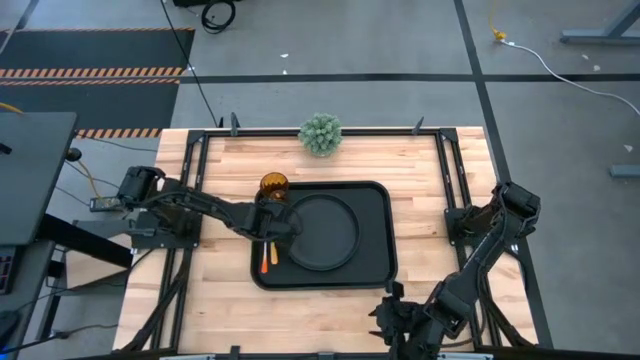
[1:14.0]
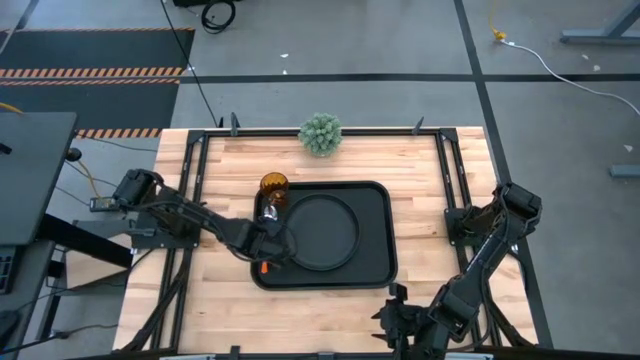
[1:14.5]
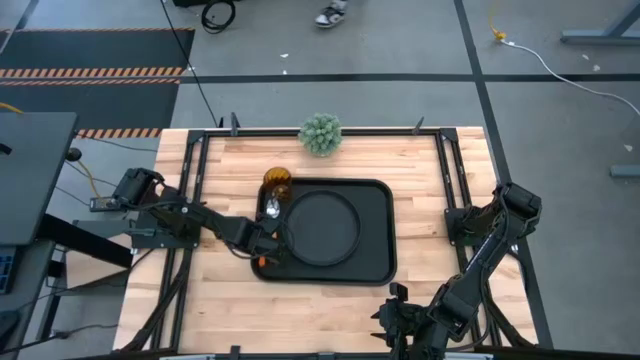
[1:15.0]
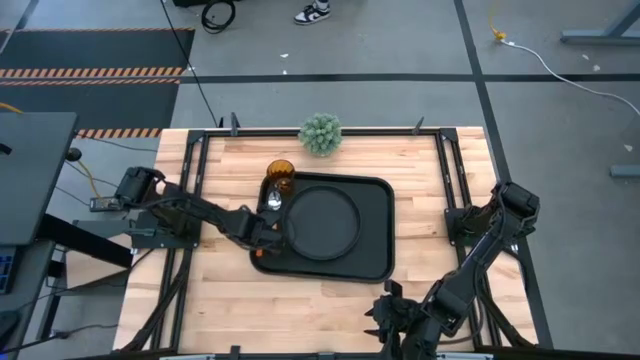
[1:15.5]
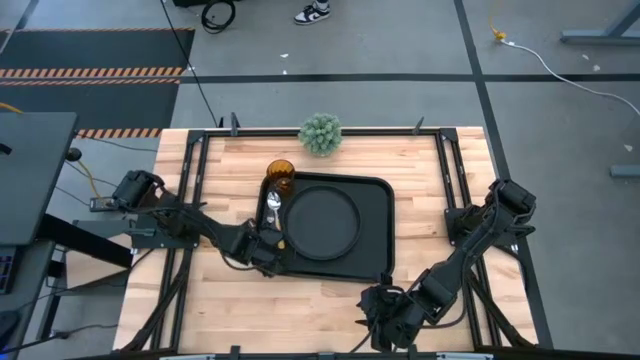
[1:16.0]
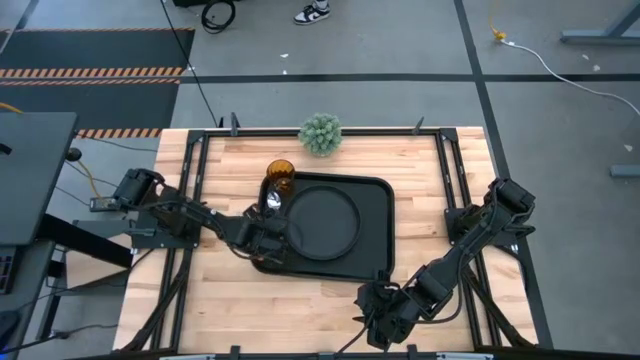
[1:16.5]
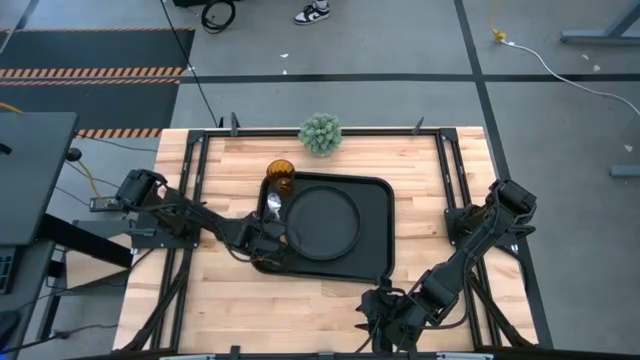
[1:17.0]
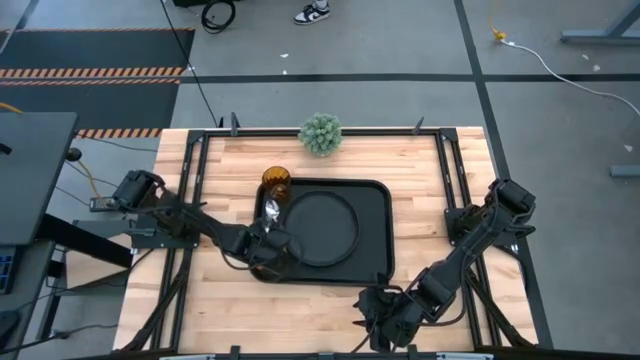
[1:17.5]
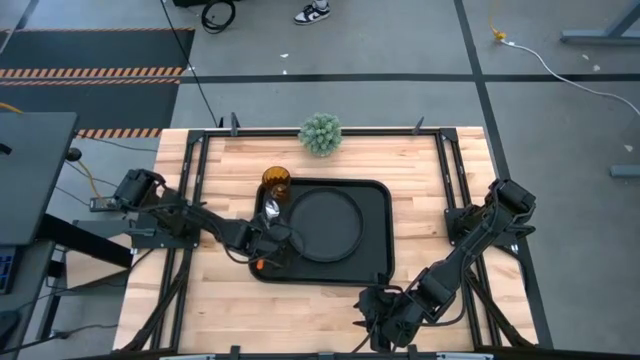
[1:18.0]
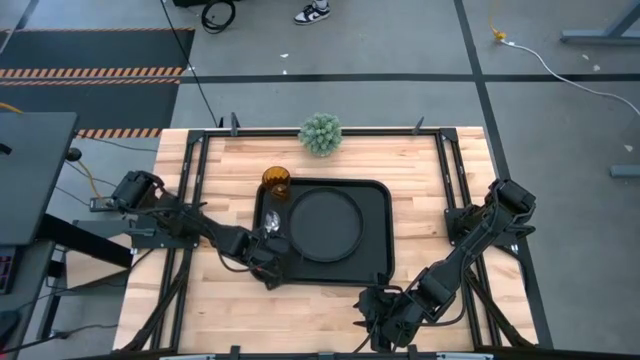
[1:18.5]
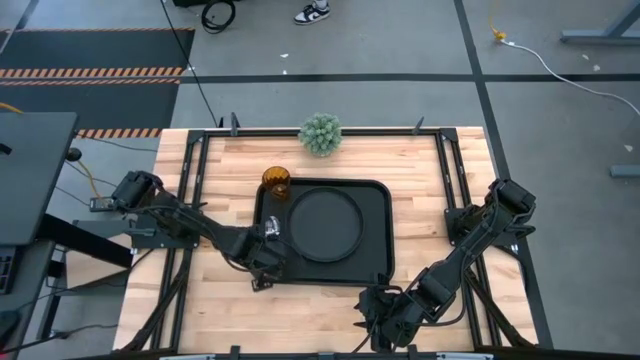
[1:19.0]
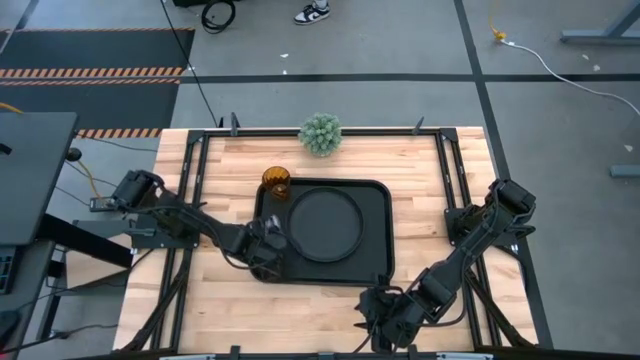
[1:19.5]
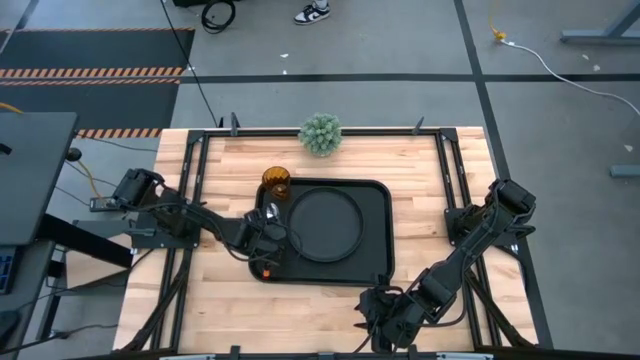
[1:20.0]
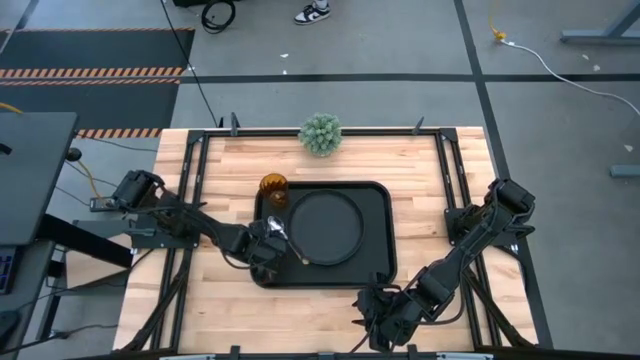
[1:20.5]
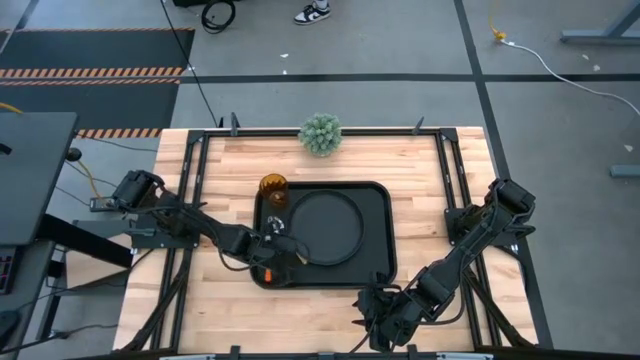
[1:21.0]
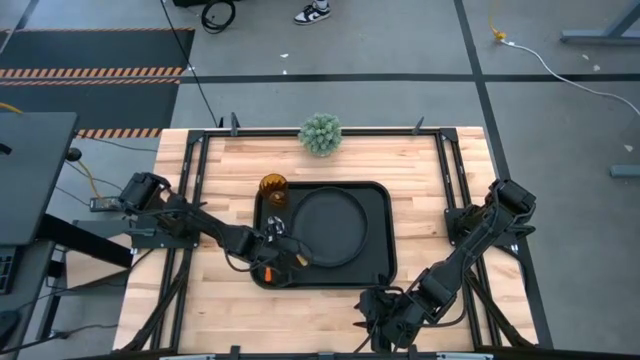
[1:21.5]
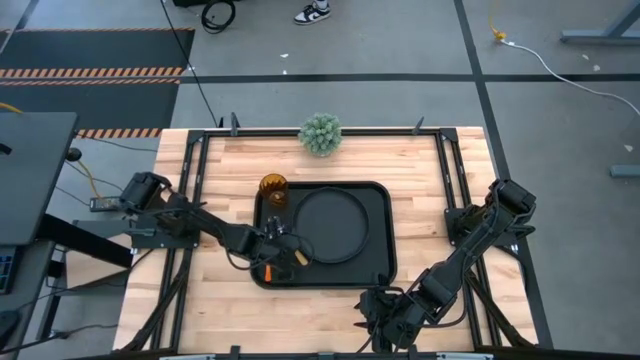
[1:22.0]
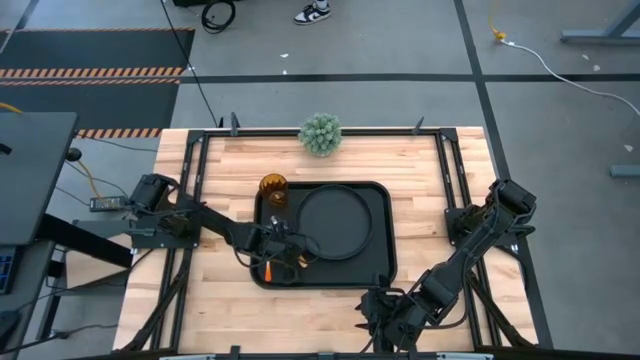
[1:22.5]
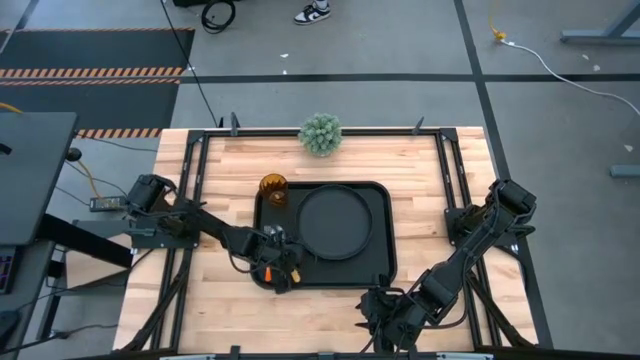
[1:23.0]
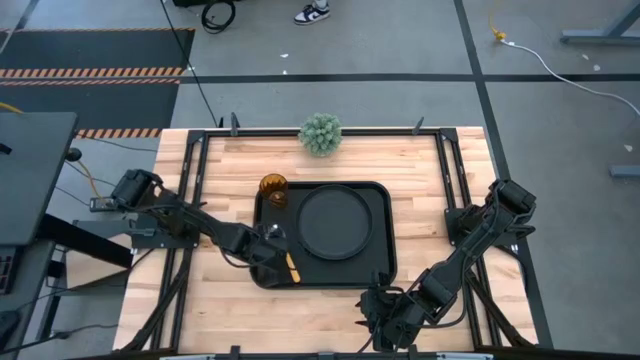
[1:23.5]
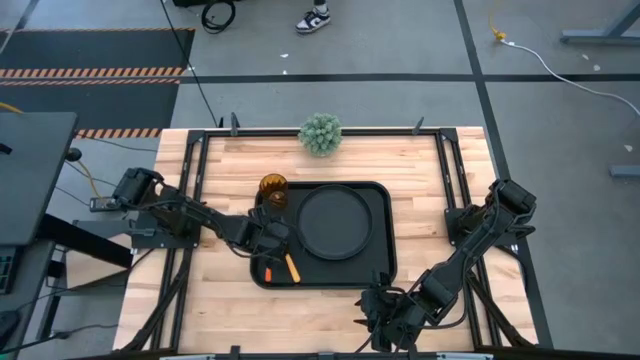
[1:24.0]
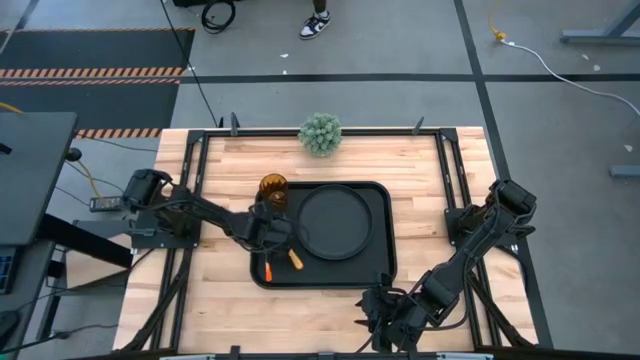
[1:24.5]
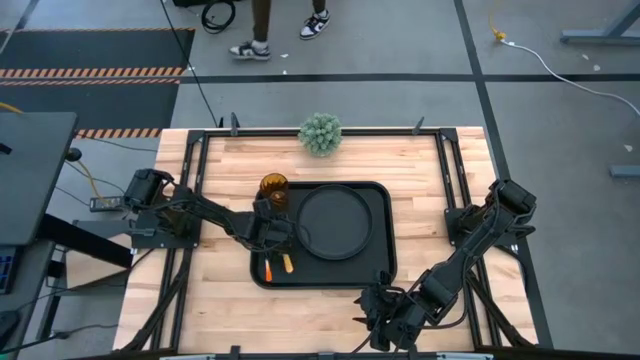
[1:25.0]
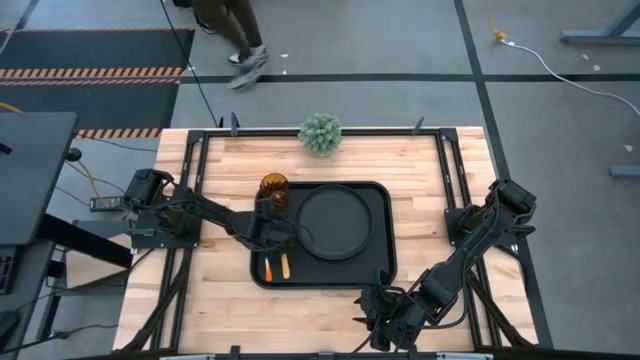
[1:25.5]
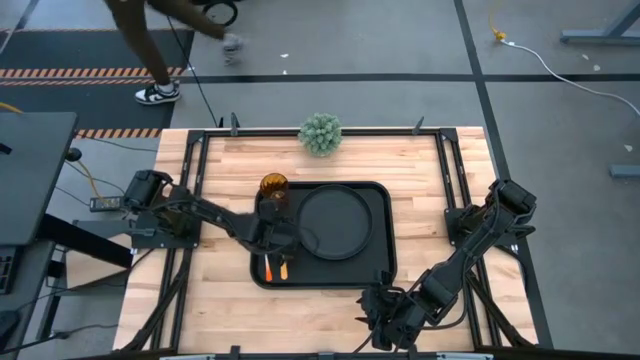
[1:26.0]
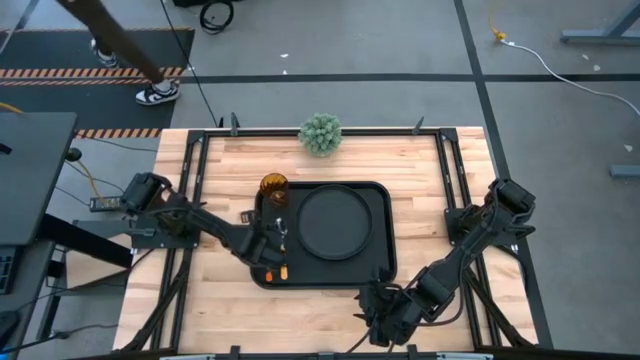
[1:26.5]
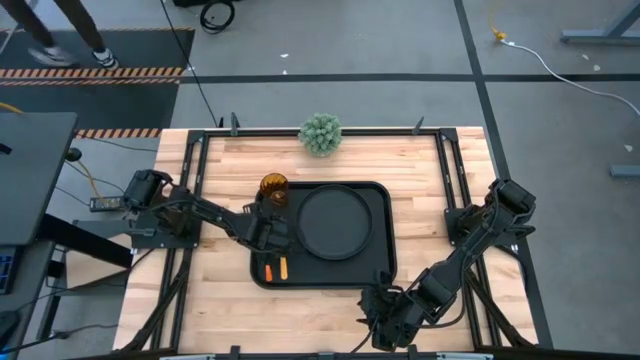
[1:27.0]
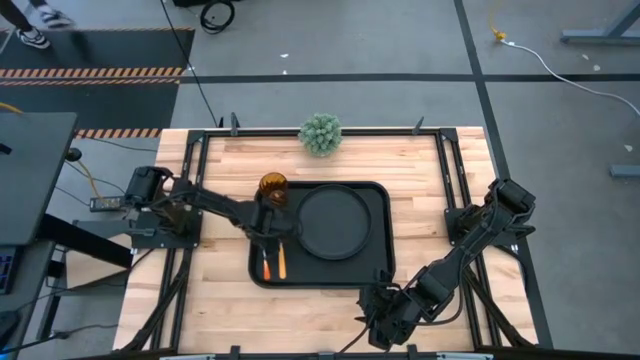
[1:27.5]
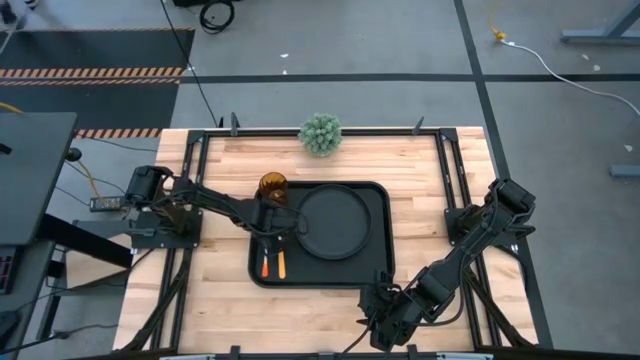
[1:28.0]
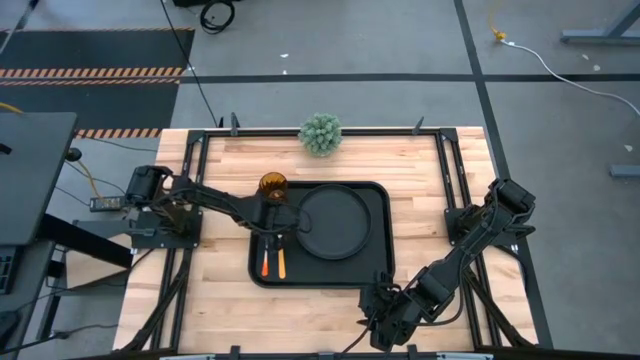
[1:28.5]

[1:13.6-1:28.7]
Task: Pick and place plate/cup/fork/spoon on tray
Adjust the orange fork and yellow spoon on the black tray

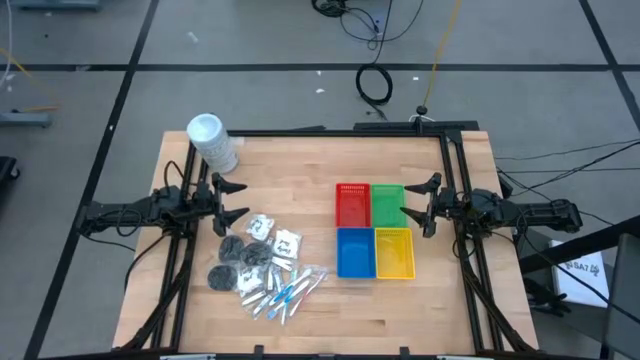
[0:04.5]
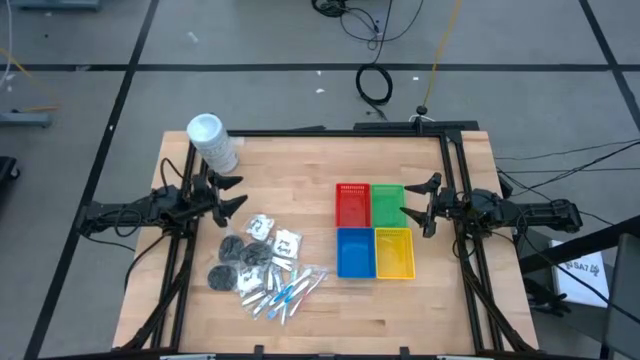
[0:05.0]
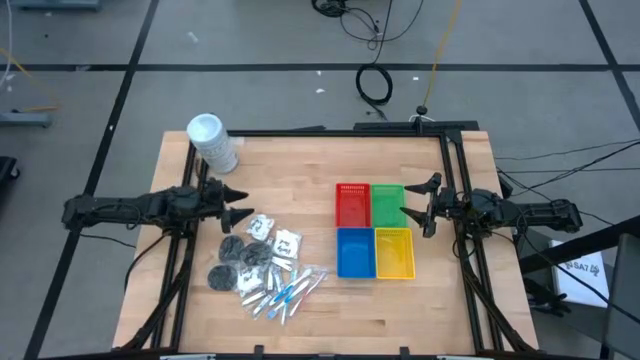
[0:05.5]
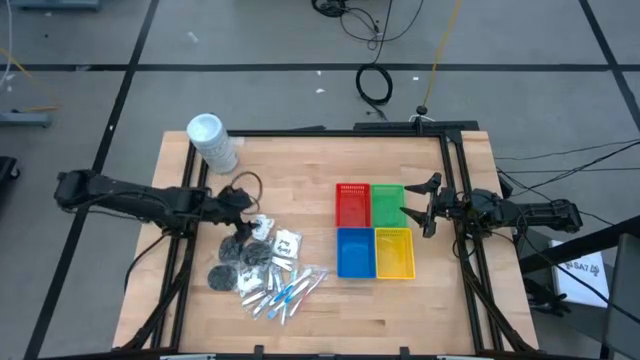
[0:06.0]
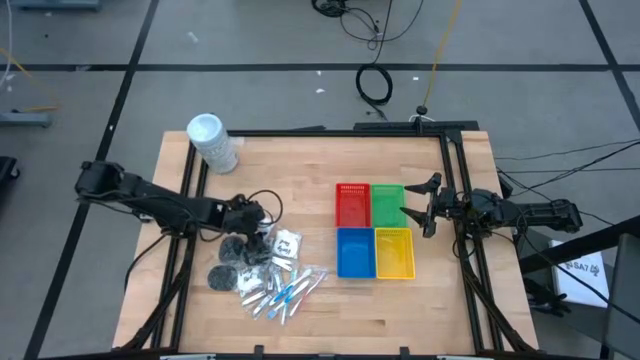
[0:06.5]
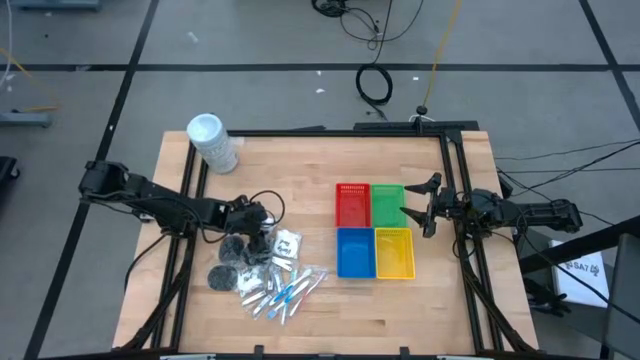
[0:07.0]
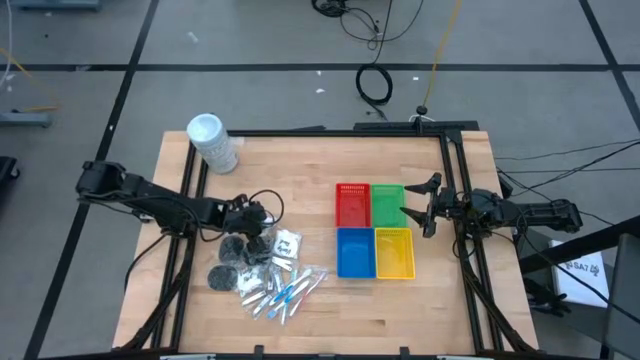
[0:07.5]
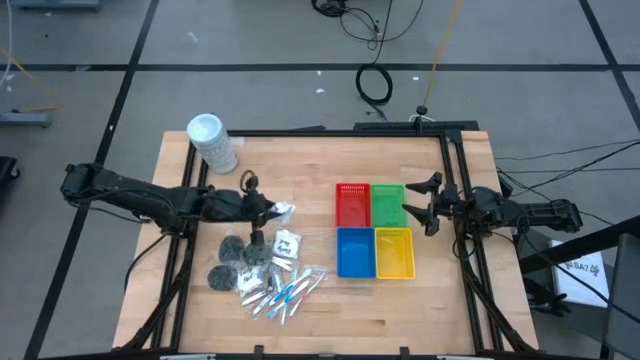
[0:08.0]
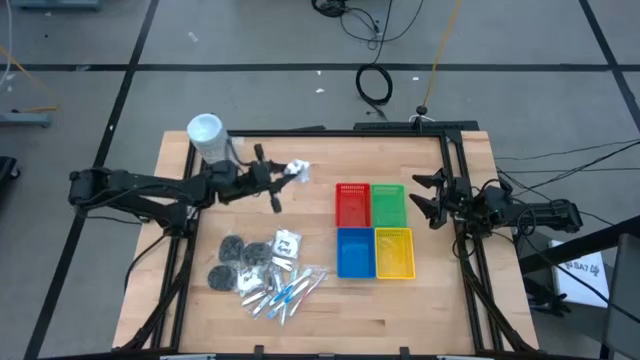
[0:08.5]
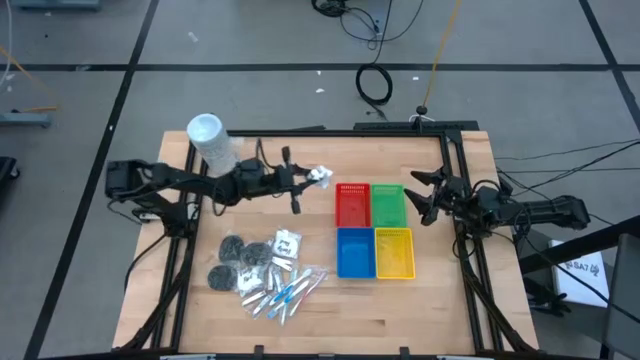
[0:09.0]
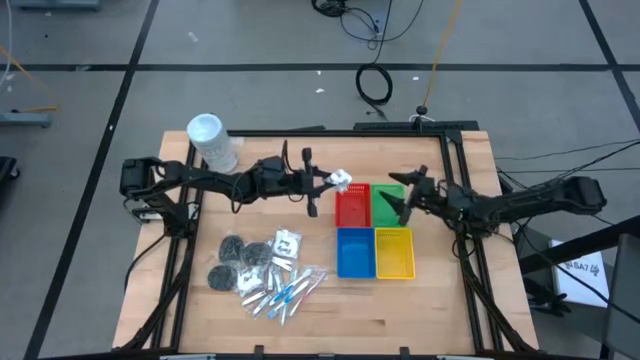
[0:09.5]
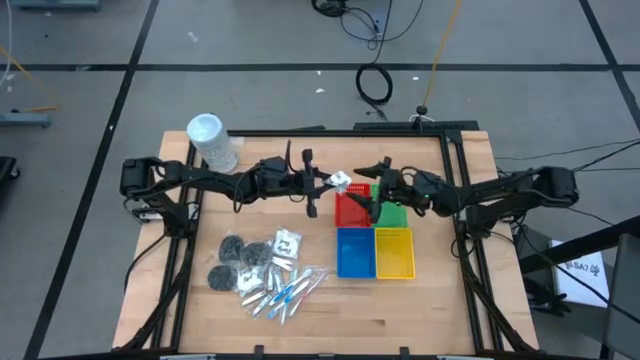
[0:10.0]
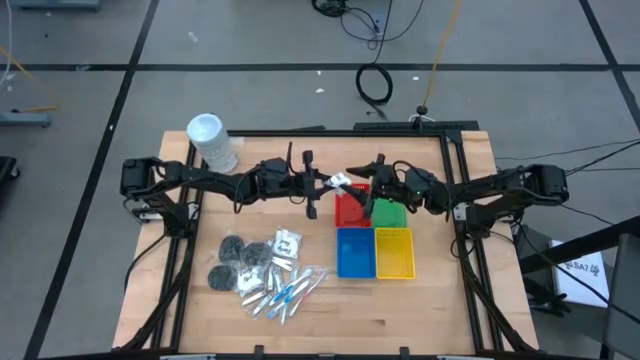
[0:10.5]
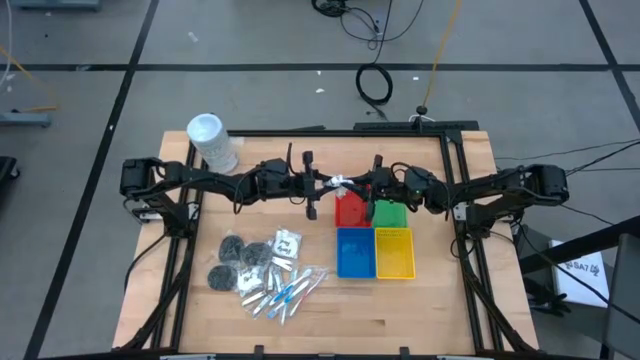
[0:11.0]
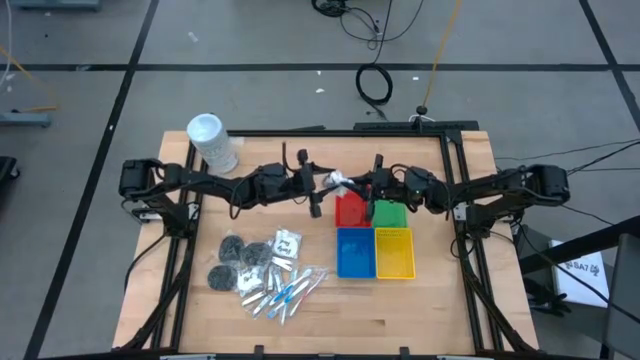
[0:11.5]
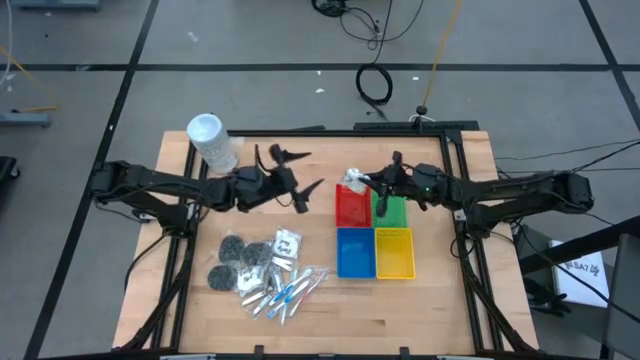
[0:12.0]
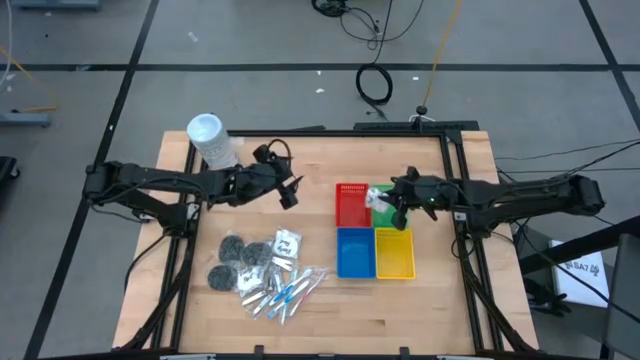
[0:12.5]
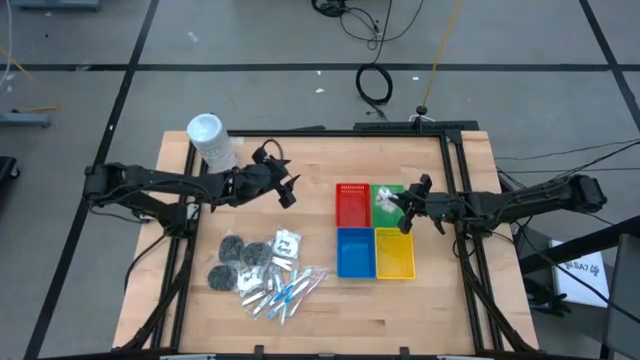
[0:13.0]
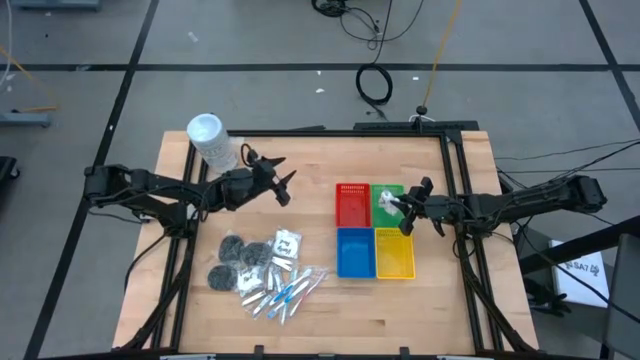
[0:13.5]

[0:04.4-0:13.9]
Task: Pick & Place Travel size toiletries
Put the cotton pack into the green bin
